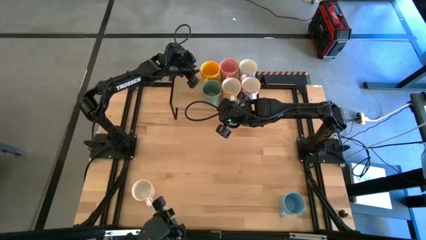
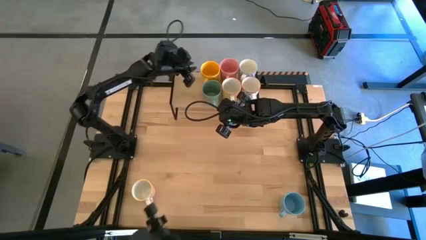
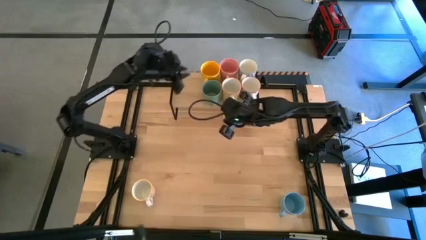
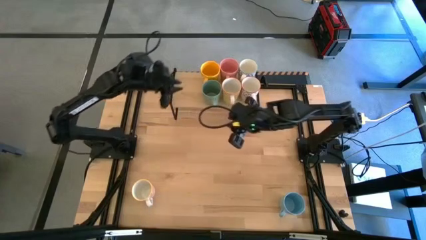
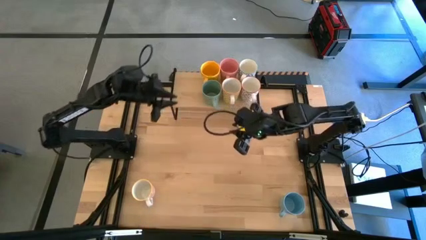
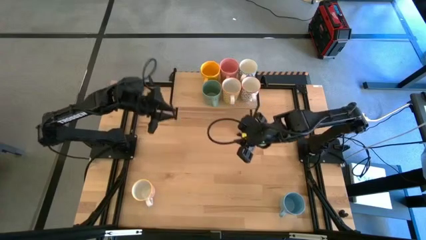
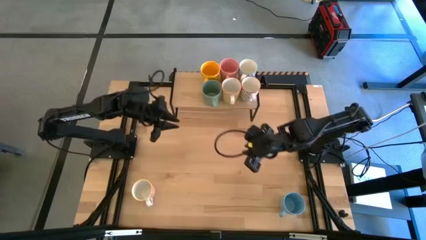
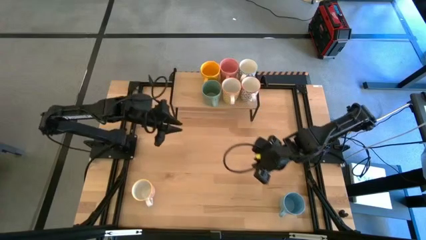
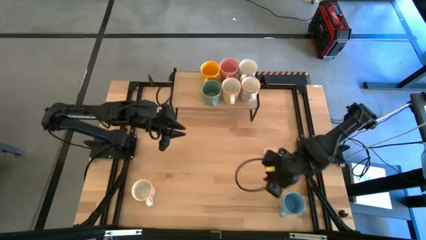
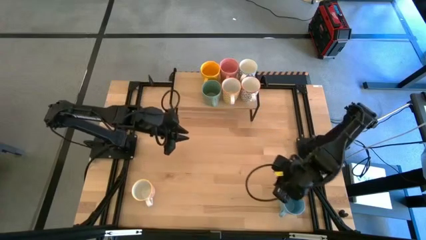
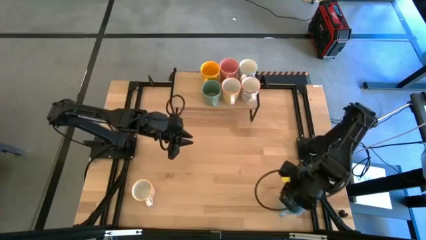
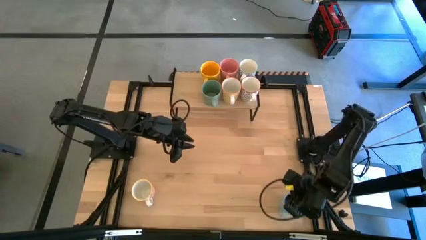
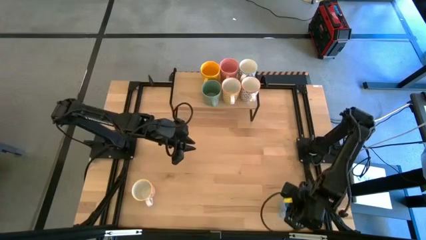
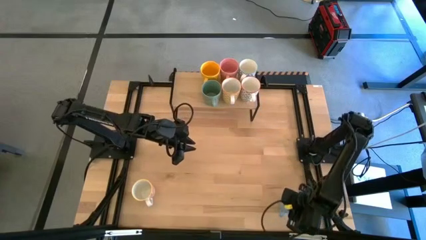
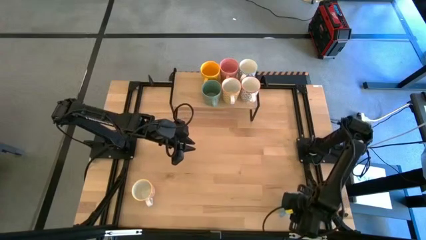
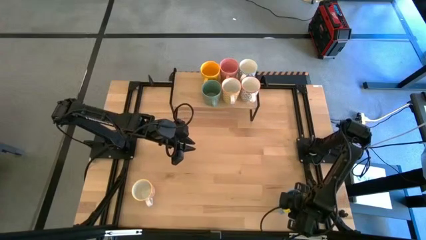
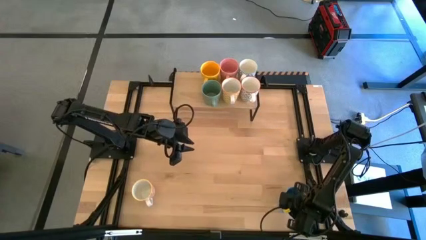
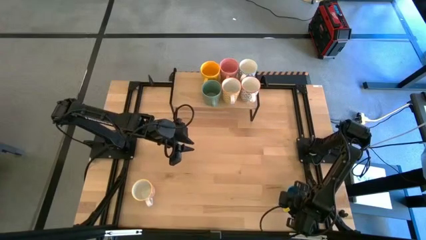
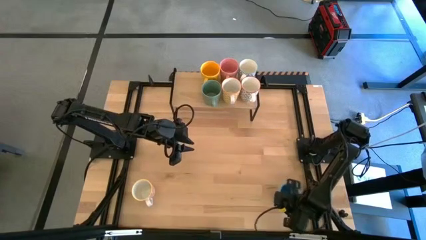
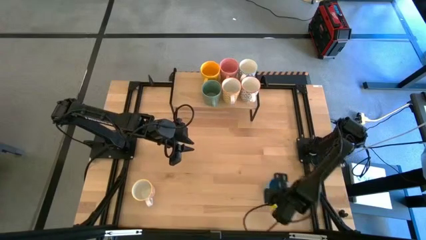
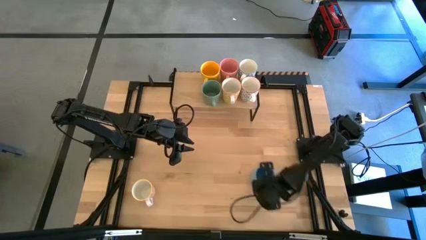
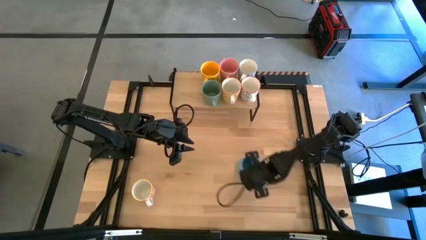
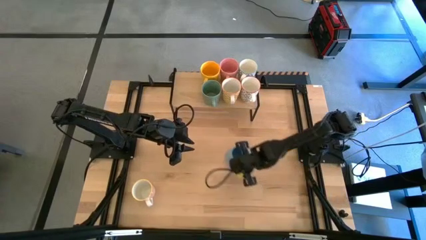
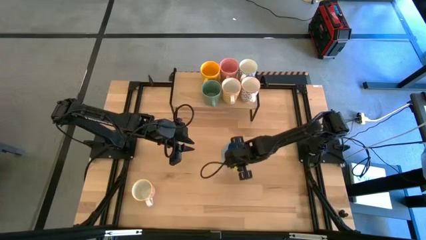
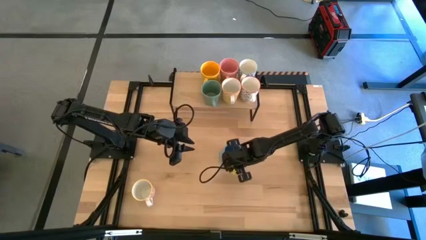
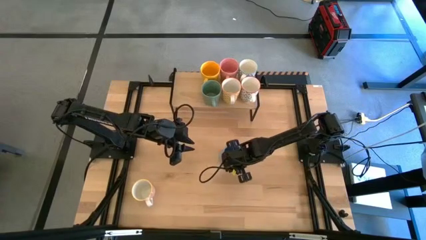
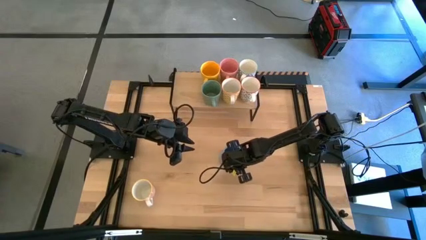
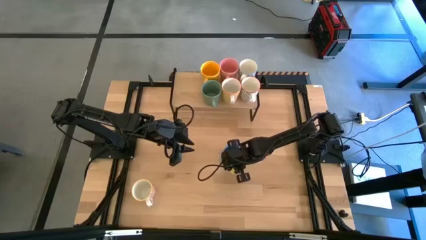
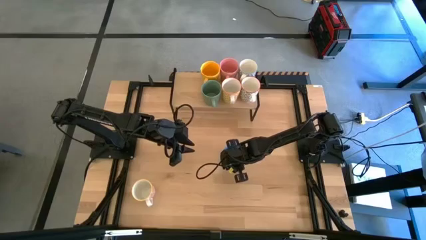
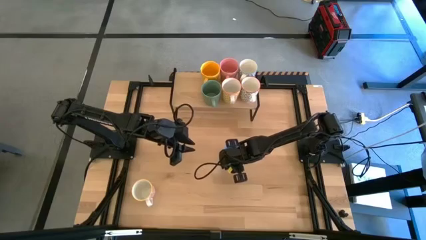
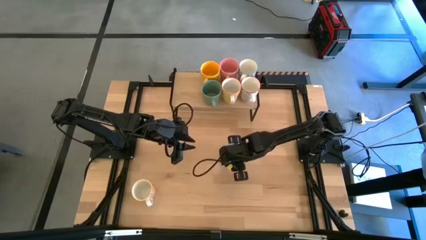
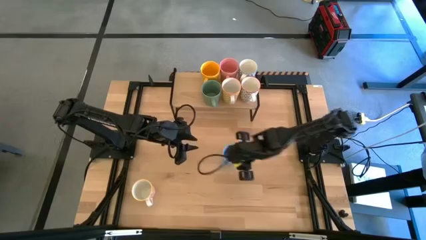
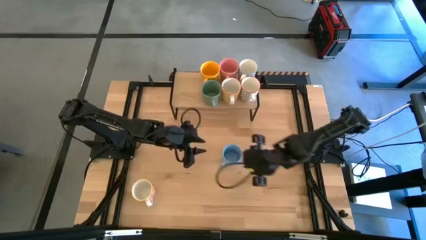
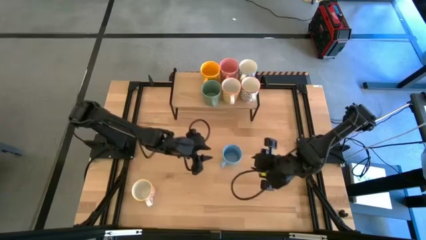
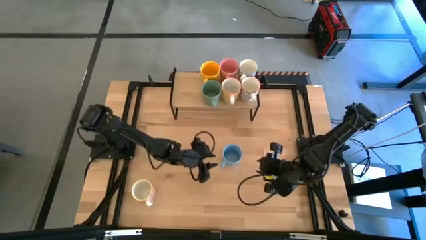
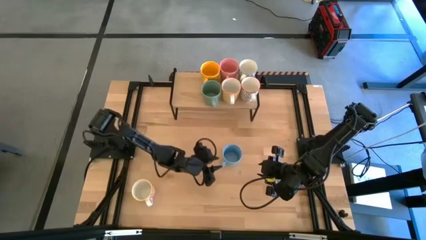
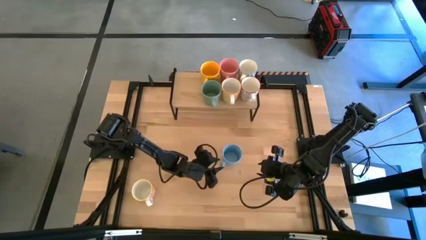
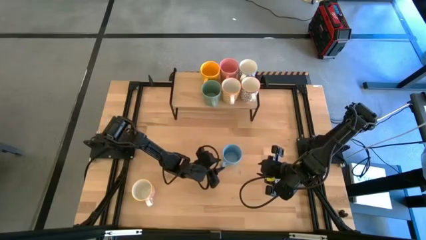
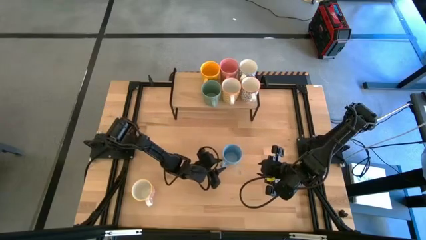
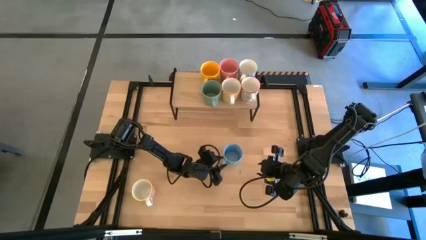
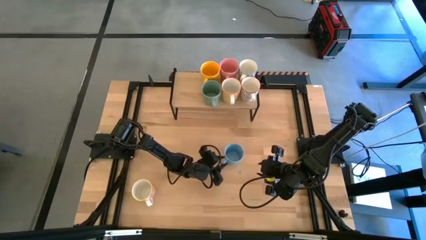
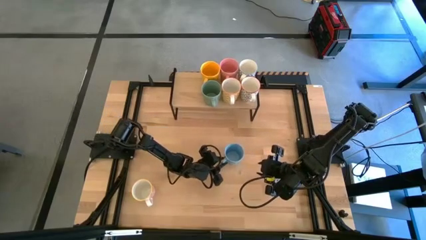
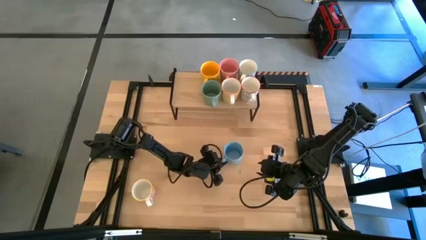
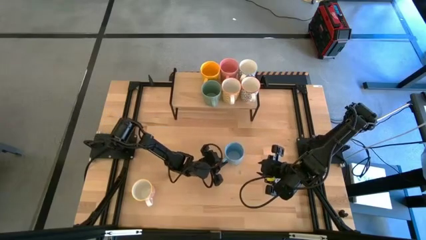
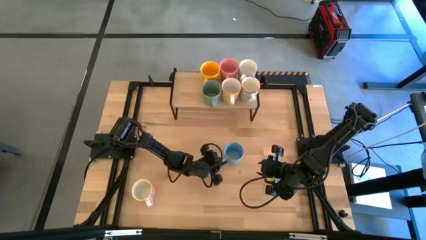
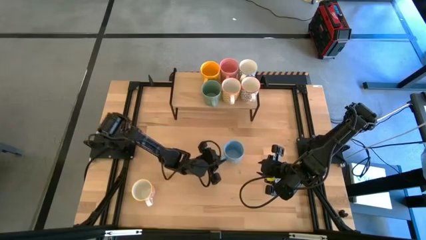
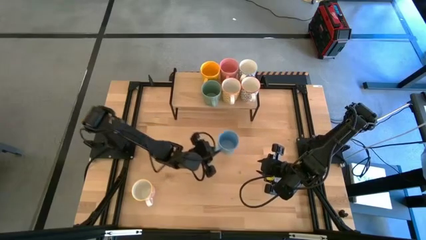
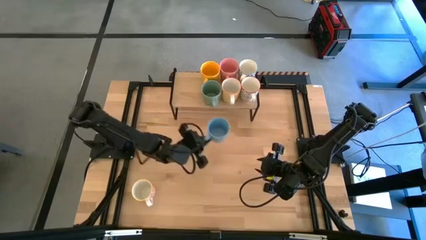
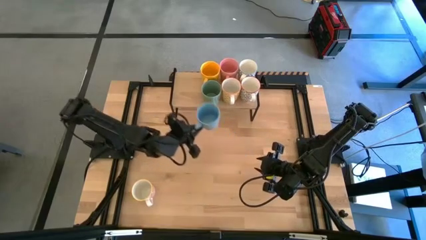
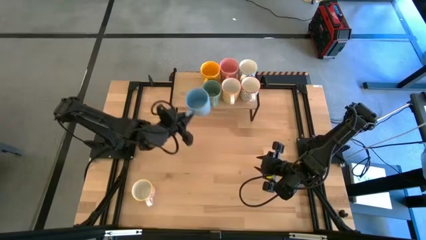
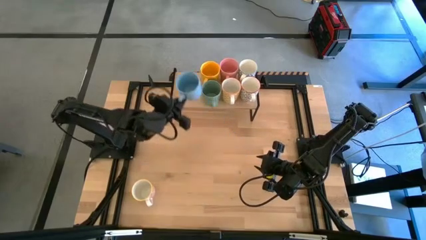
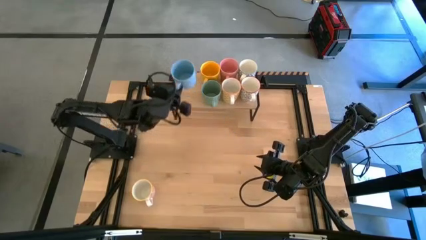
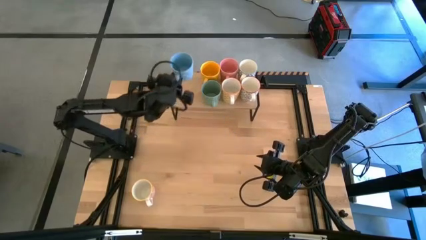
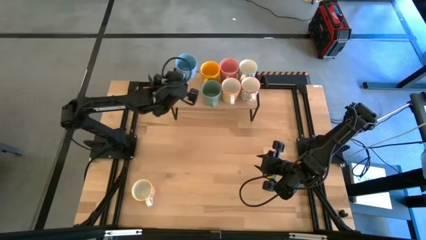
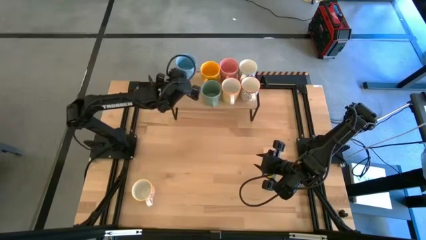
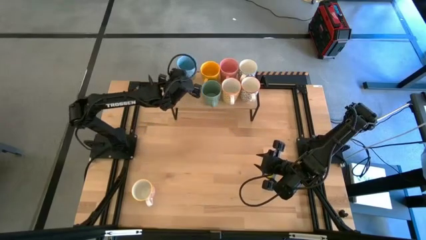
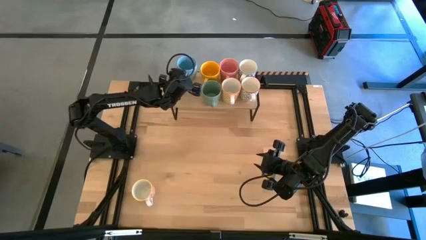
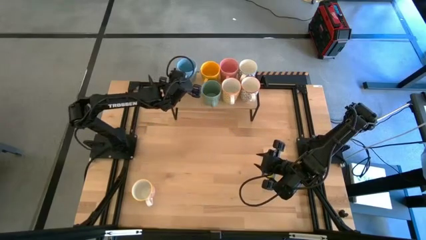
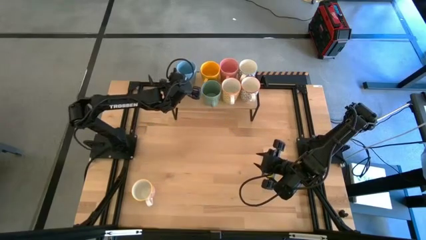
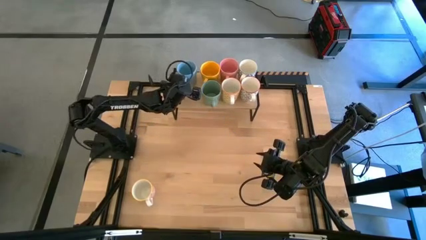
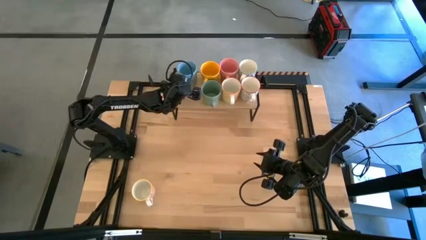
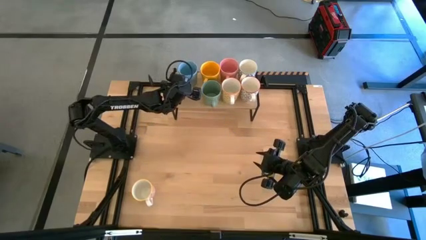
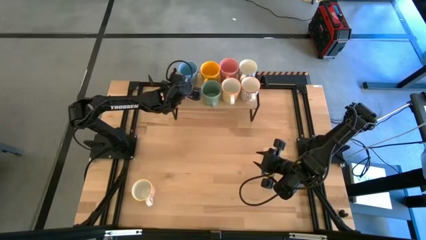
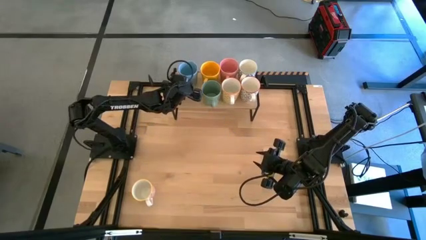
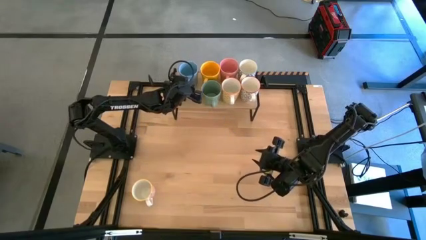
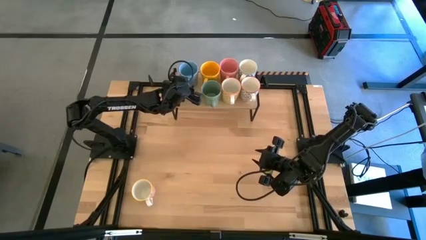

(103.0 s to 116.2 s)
Task: Place coffee mugs
Put the blue mug on the shelf
